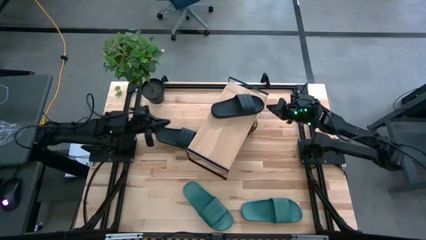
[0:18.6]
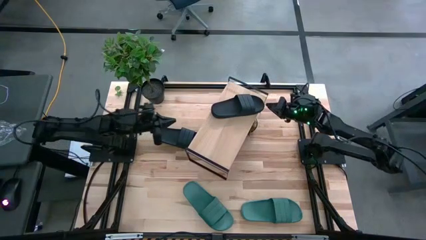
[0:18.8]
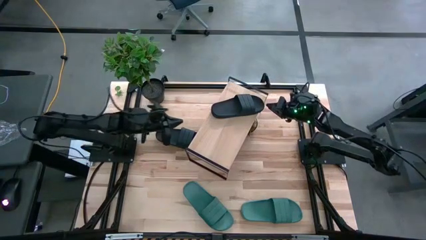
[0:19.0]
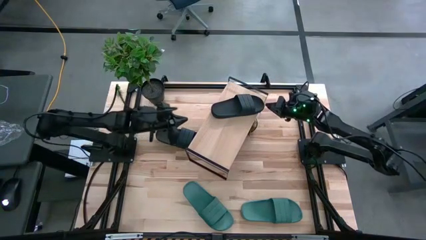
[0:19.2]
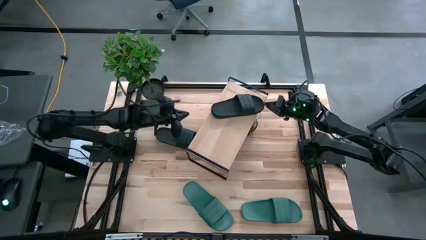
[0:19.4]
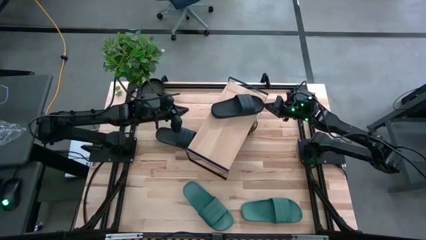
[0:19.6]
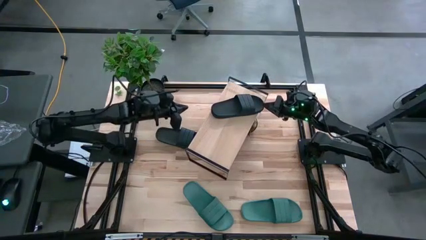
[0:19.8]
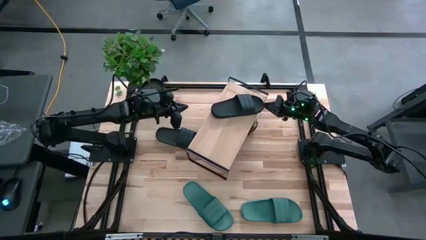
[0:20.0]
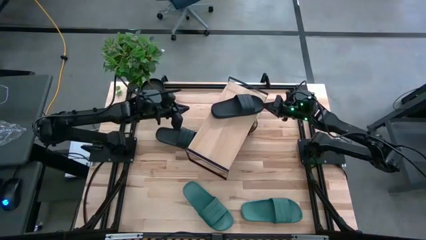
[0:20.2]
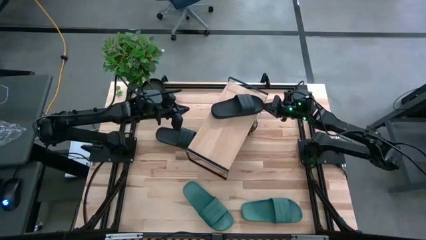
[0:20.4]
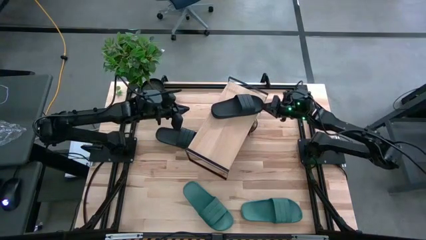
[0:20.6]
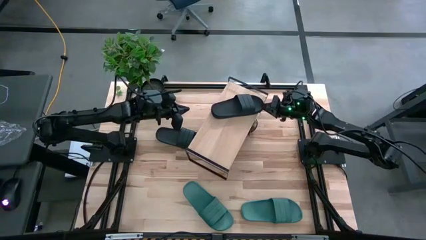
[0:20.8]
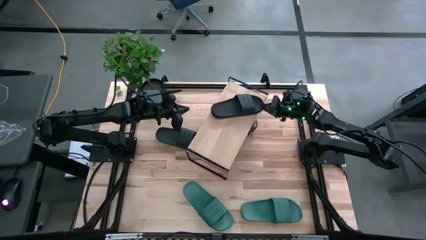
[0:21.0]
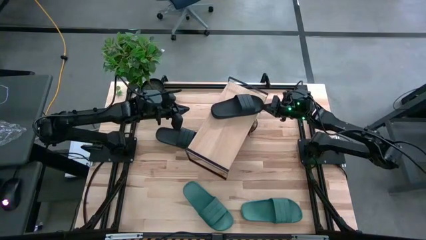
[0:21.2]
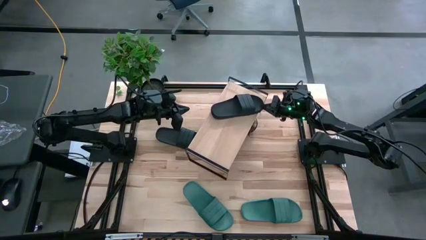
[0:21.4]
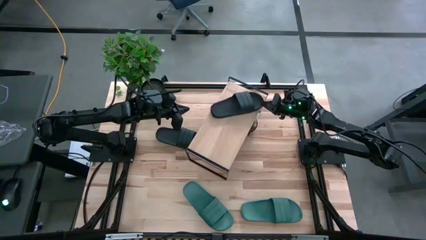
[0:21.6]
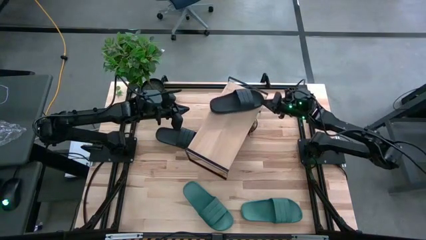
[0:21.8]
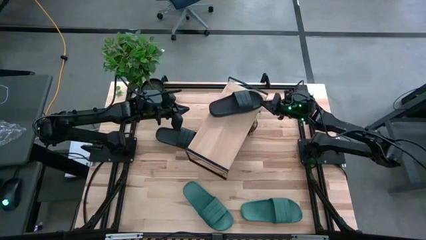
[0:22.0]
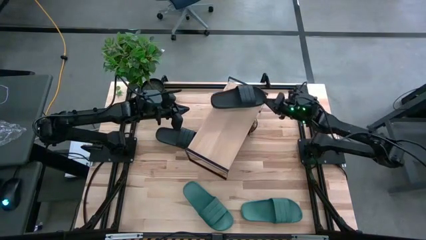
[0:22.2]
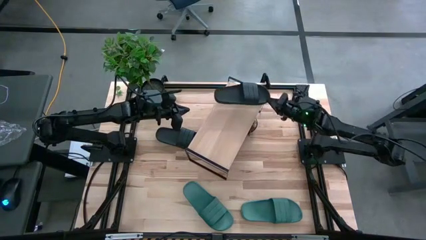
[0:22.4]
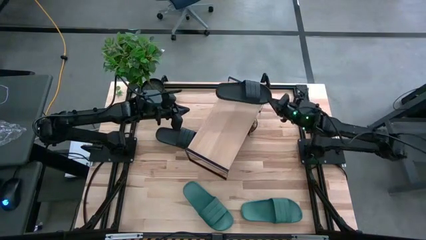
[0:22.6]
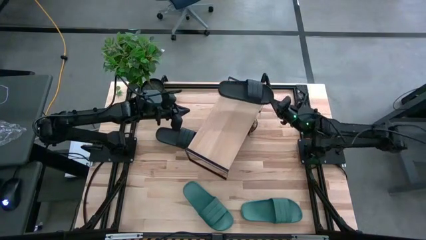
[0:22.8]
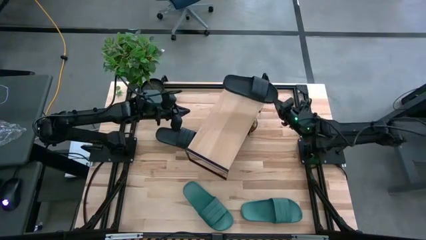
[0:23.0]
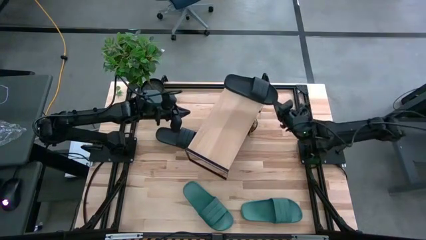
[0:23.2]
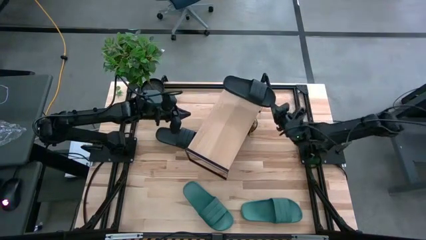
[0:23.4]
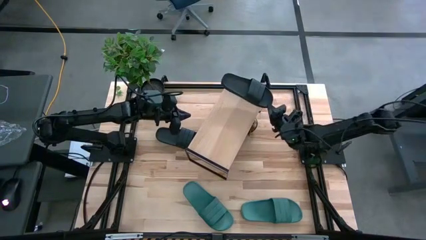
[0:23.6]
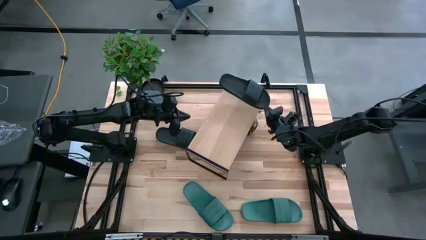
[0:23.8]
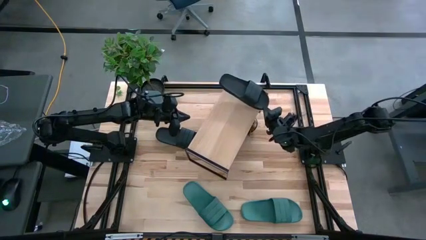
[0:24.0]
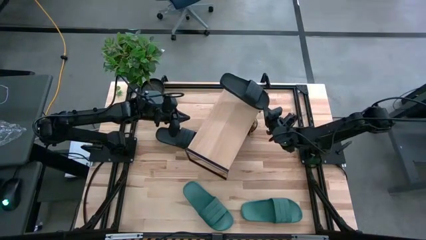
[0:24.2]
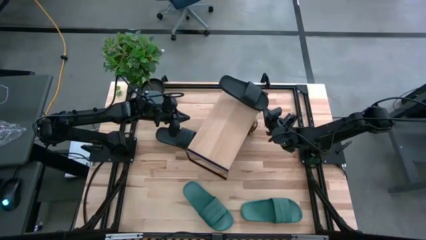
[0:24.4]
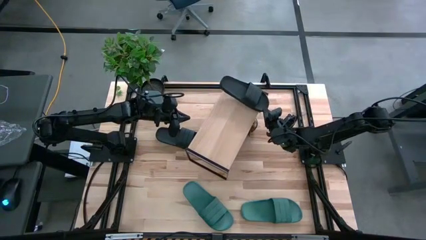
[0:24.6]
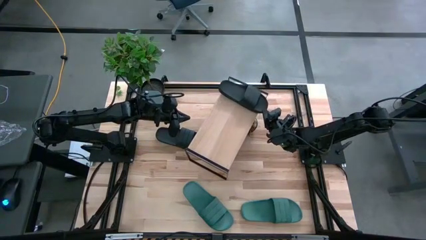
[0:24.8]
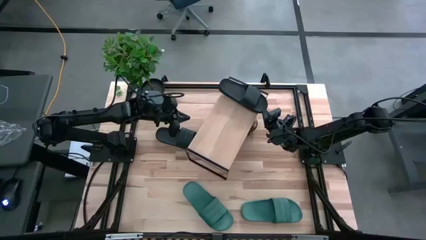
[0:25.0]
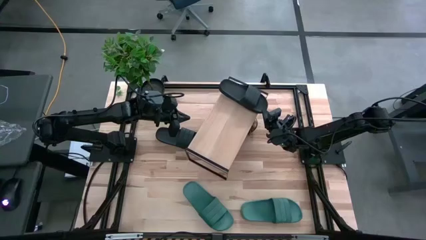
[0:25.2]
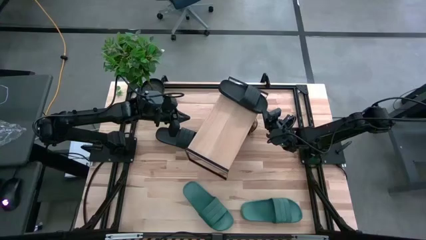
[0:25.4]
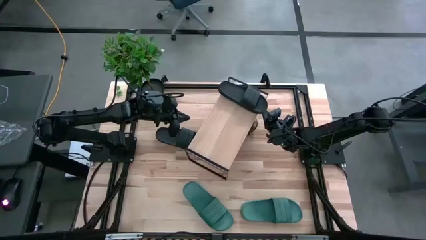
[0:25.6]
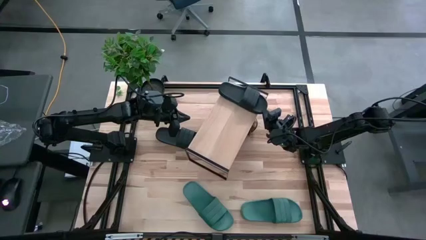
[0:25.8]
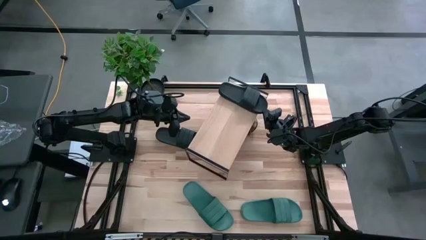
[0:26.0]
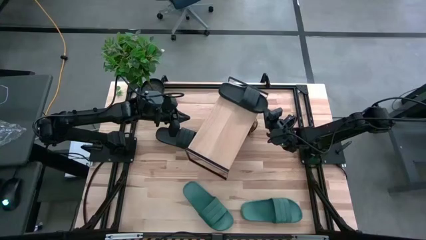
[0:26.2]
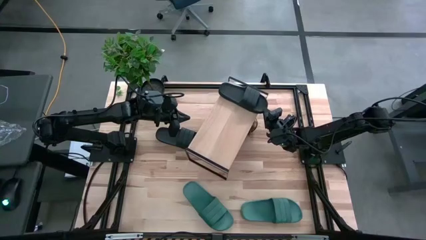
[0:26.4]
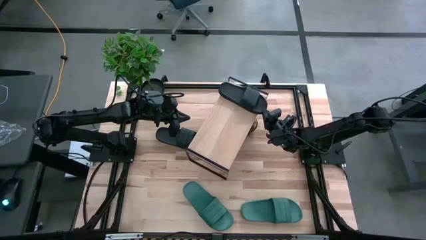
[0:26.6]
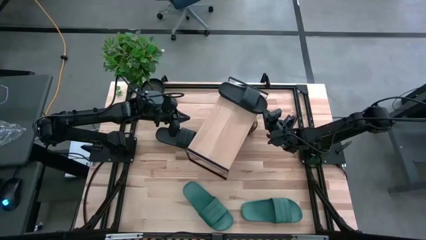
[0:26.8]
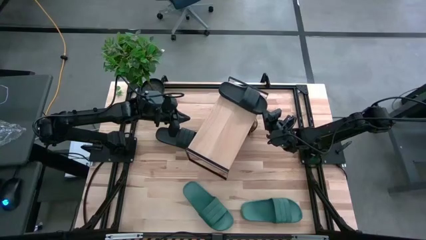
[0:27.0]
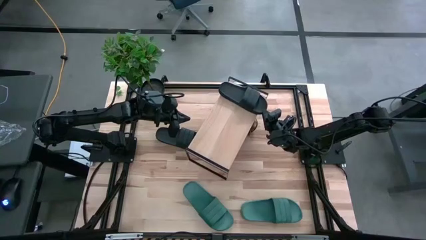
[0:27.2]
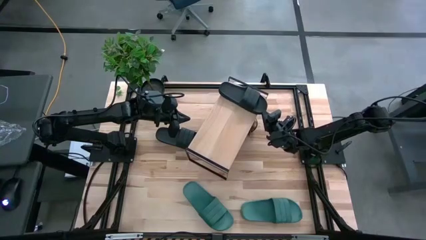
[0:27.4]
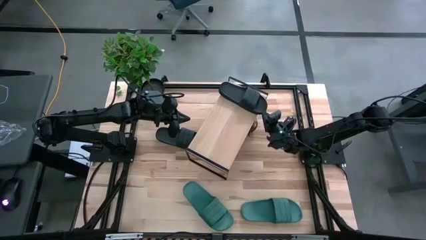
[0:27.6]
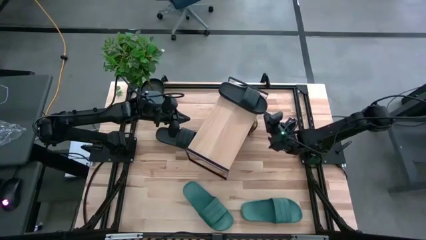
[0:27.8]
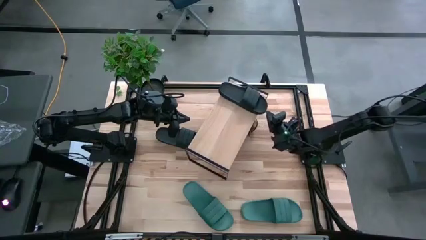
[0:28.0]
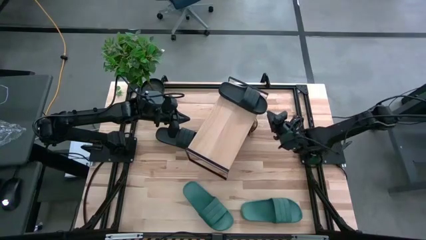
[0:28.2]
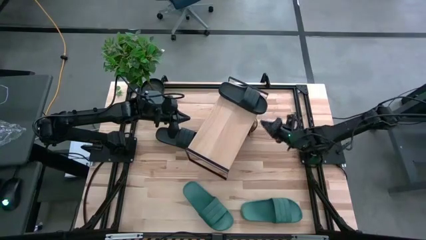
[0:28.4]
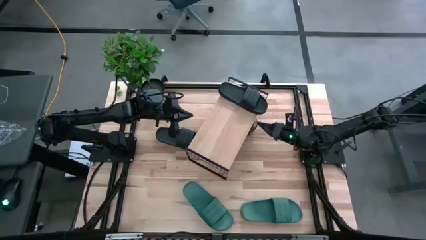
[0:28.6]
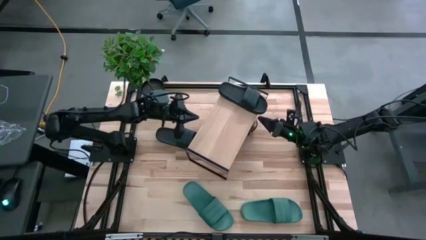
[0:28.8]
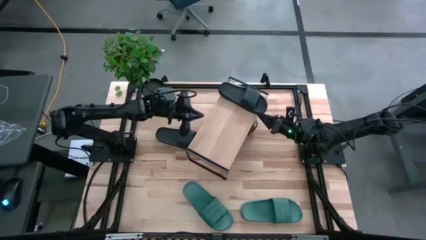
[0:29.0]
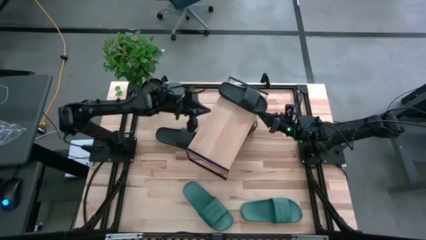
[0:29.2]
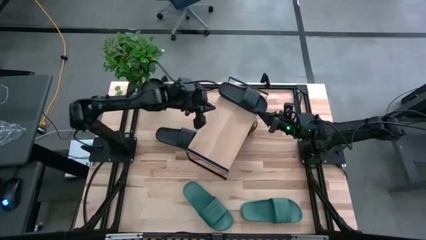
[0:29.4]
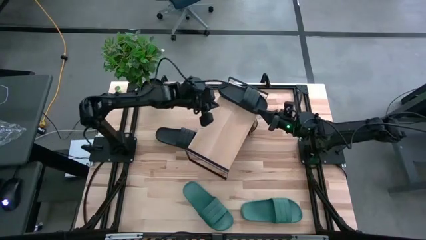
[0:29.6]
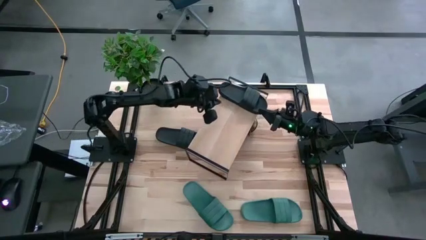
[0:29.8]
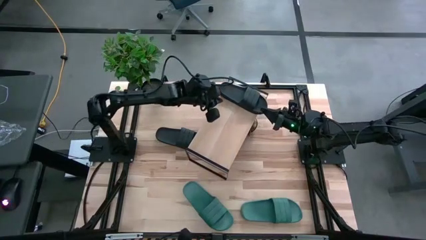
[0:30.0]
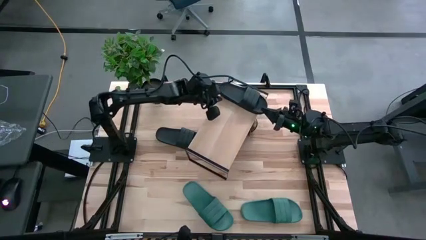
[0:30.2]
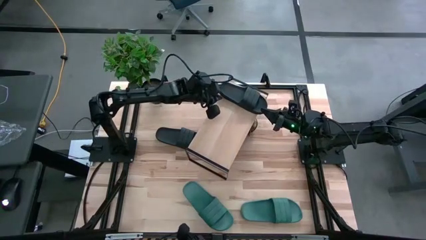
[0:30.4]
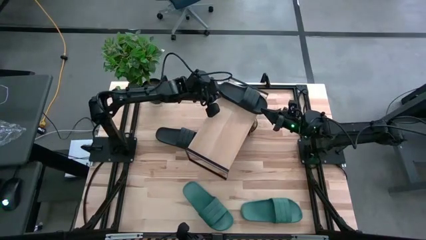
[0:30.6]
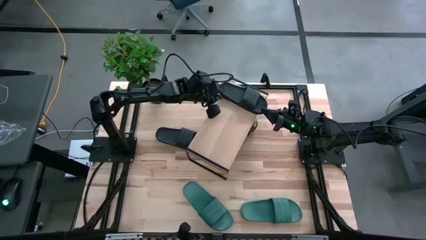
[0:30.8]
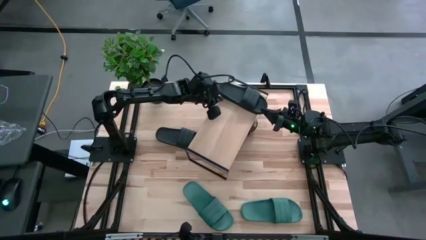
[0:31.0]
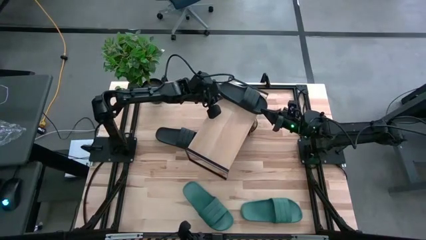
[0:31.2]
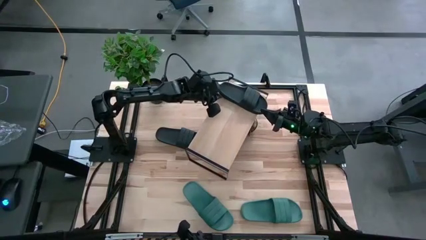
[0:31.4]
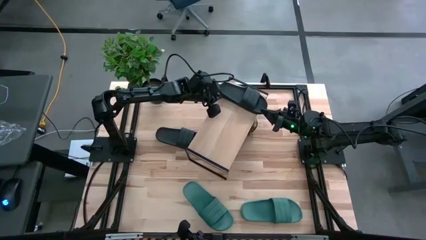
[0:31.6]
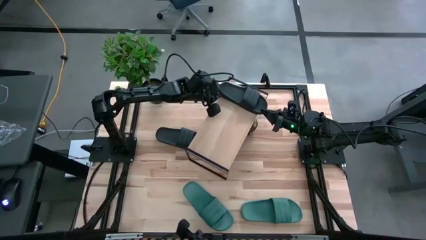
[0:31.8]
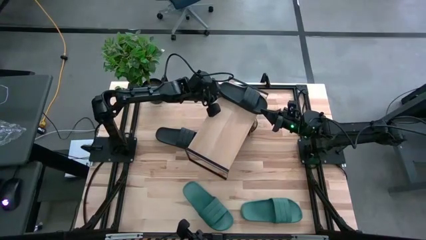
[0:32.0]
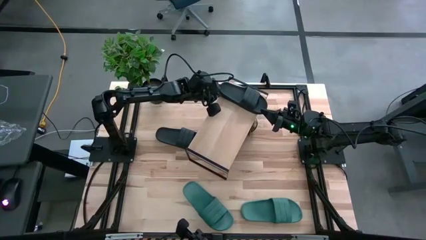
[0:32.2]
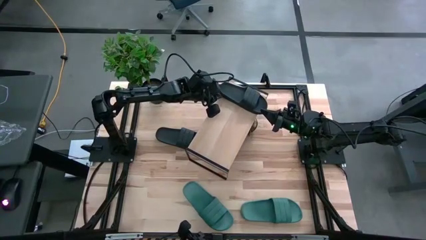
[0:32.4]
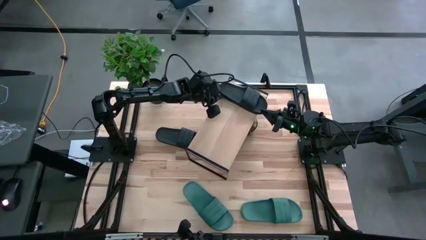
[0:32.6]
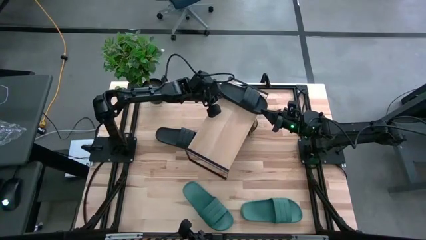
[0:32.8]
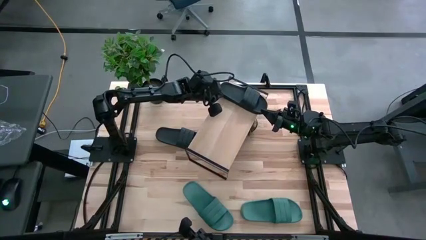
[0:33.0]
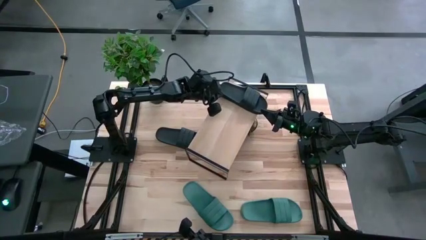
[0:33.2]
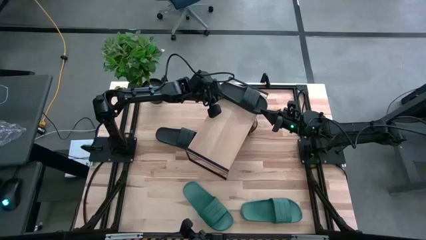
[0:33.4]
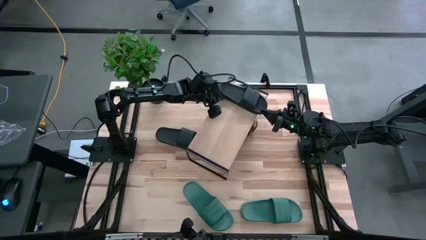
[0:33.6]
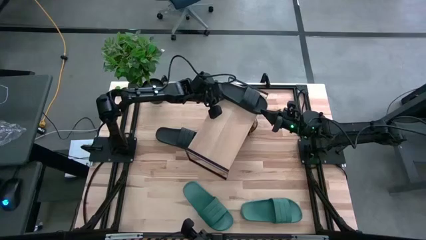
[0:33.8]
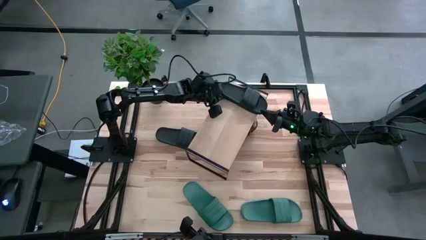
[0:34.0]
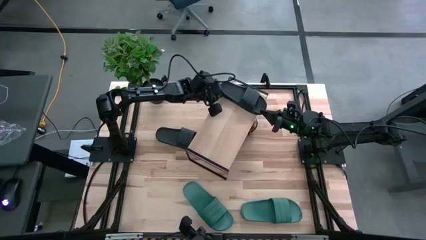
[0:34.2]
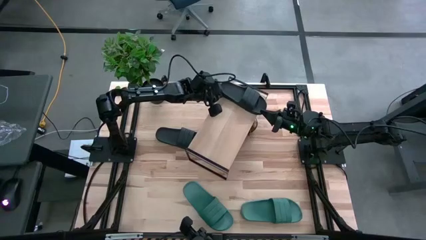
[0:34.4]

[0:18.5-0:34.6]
Task: Pick and place slides into the shelf
Put the right black slipper on the shelf
